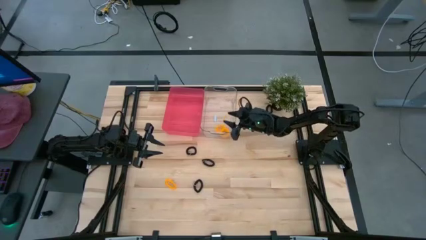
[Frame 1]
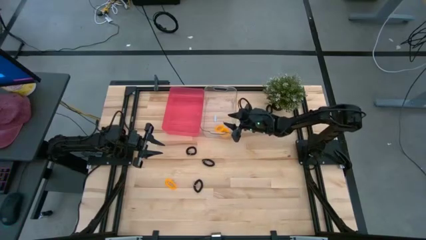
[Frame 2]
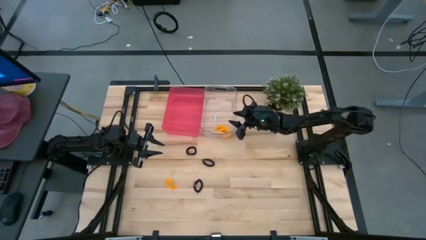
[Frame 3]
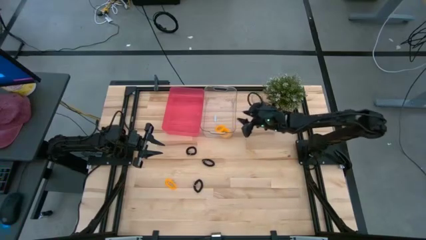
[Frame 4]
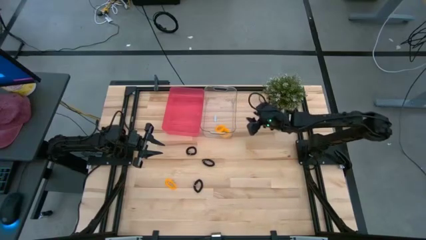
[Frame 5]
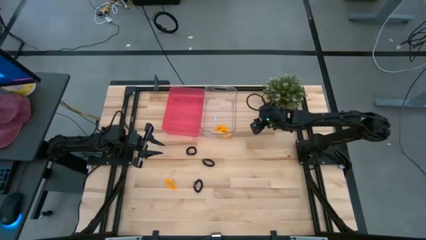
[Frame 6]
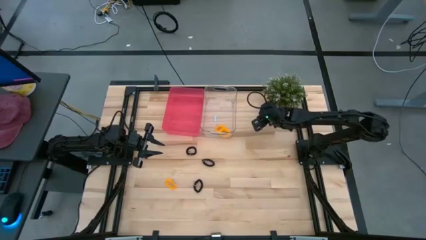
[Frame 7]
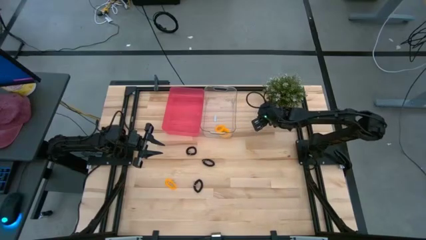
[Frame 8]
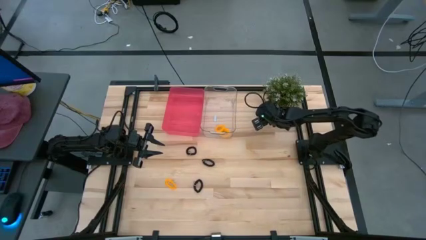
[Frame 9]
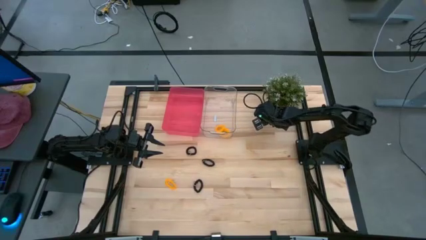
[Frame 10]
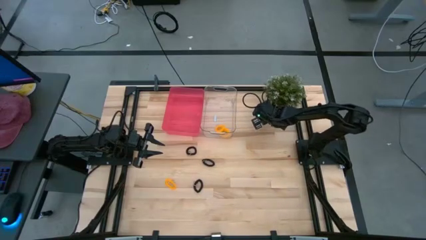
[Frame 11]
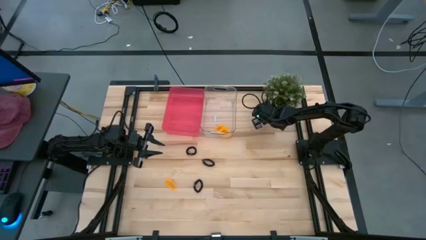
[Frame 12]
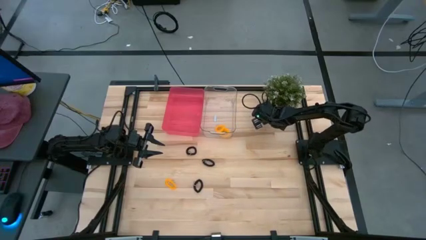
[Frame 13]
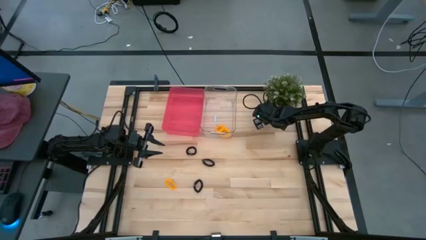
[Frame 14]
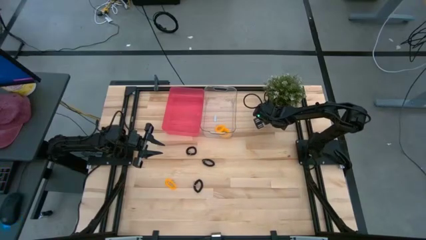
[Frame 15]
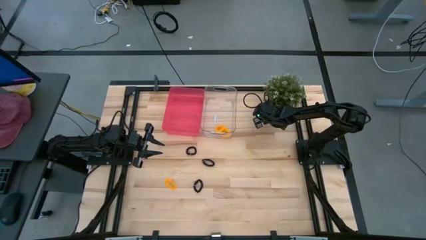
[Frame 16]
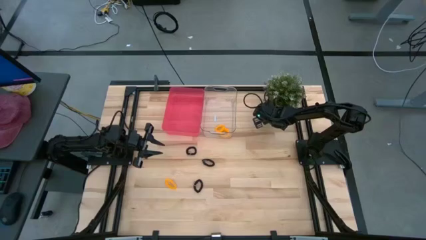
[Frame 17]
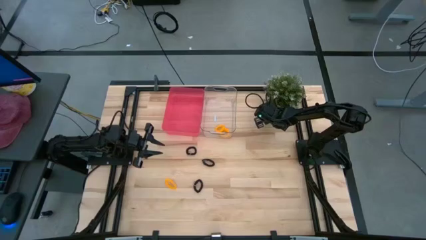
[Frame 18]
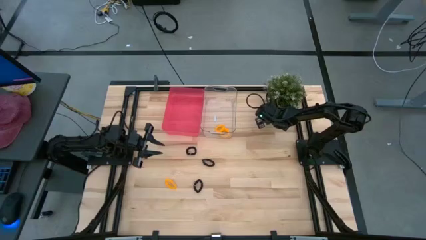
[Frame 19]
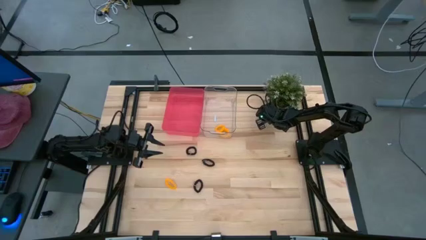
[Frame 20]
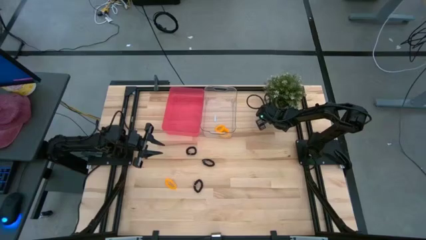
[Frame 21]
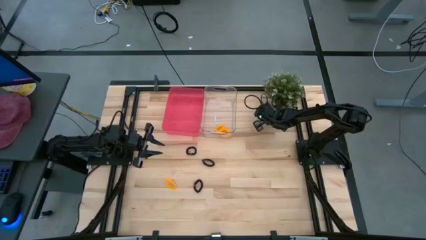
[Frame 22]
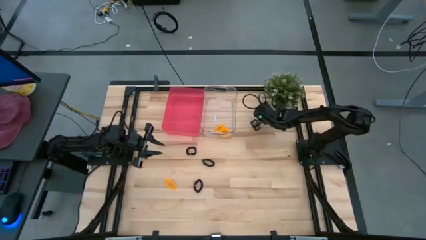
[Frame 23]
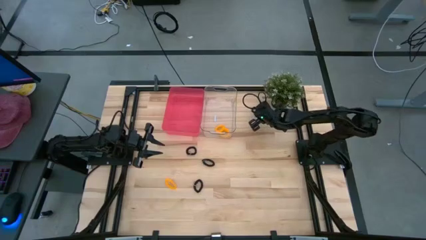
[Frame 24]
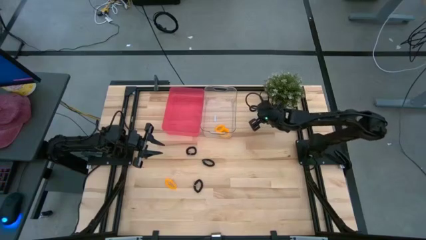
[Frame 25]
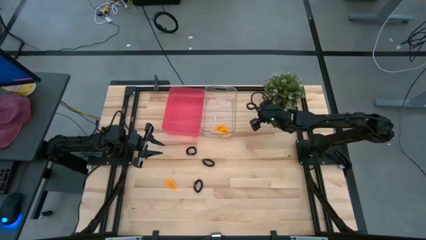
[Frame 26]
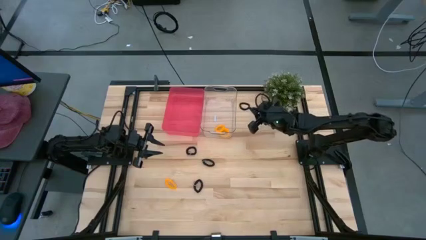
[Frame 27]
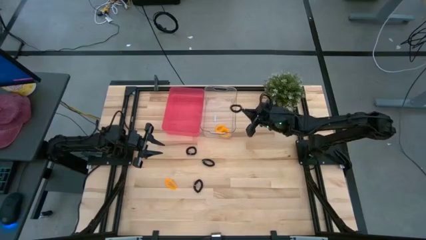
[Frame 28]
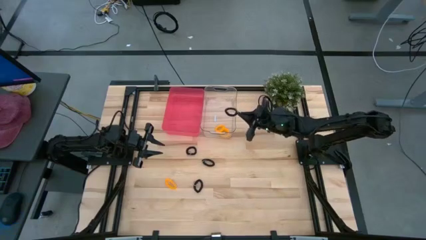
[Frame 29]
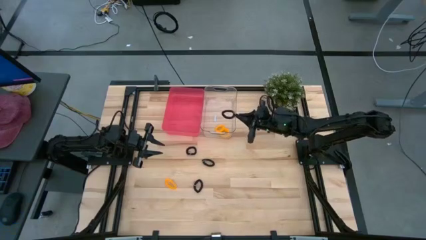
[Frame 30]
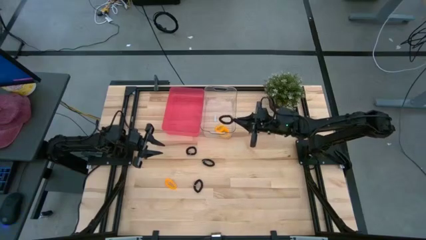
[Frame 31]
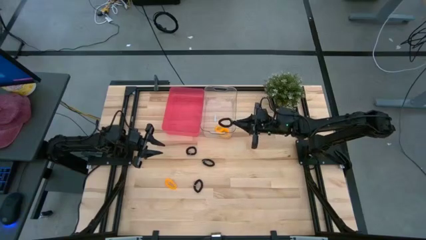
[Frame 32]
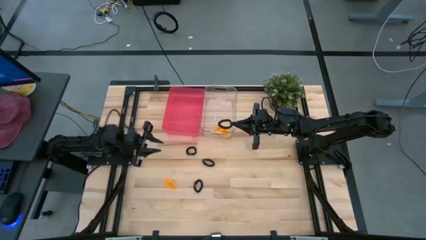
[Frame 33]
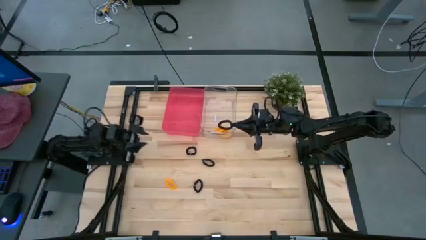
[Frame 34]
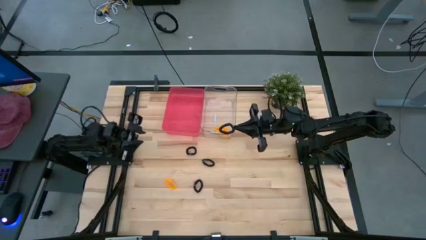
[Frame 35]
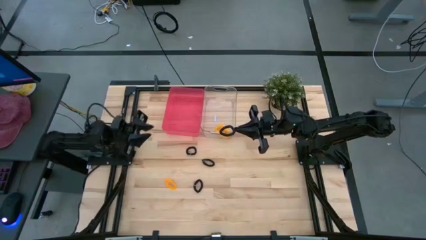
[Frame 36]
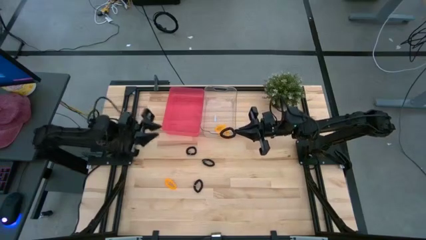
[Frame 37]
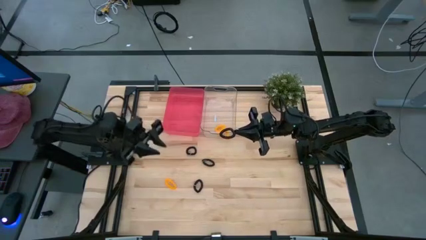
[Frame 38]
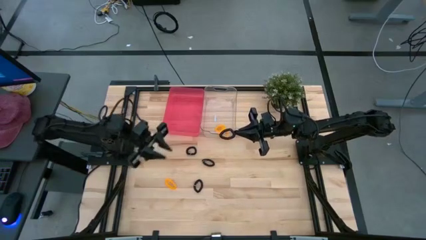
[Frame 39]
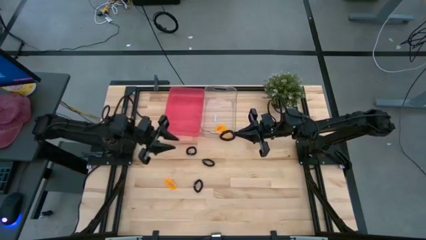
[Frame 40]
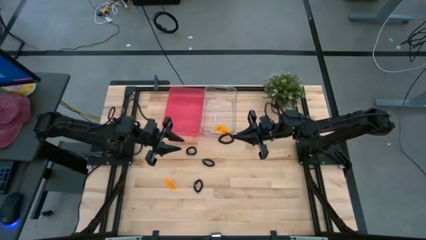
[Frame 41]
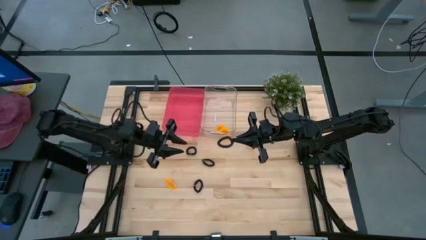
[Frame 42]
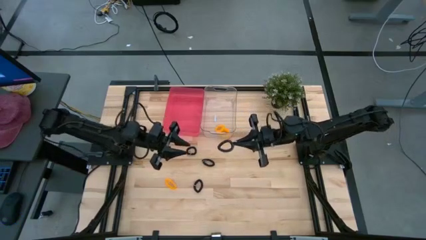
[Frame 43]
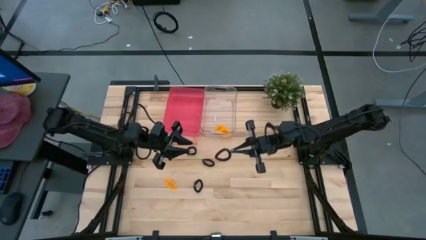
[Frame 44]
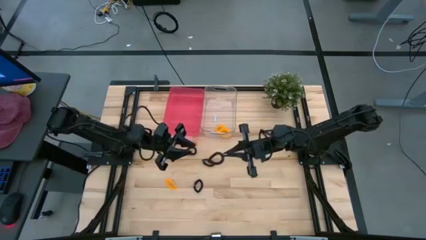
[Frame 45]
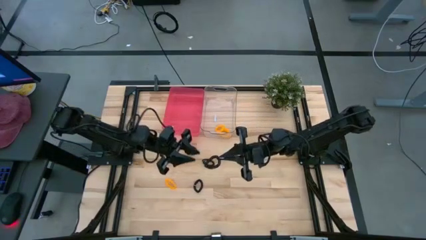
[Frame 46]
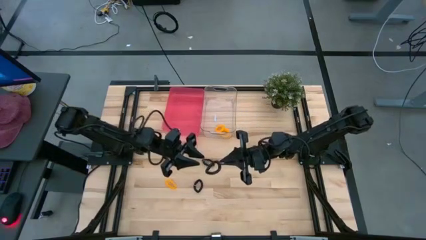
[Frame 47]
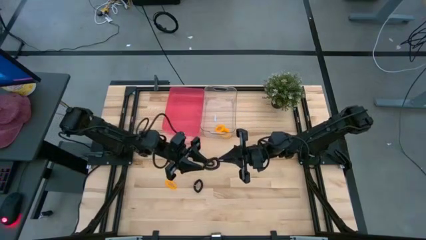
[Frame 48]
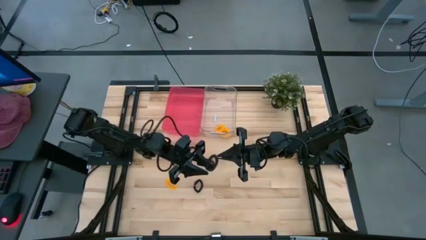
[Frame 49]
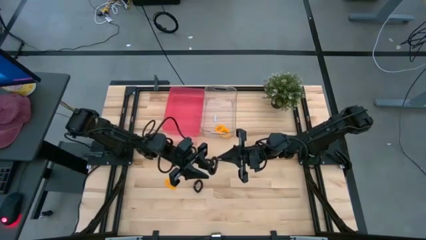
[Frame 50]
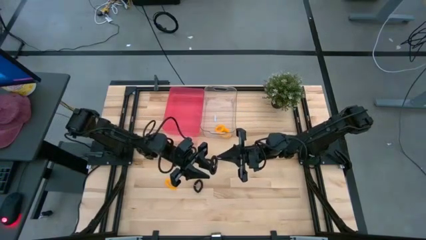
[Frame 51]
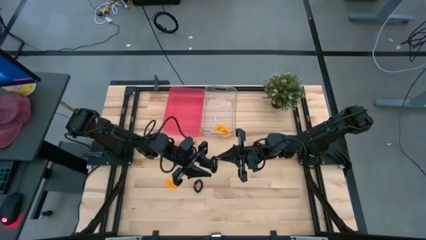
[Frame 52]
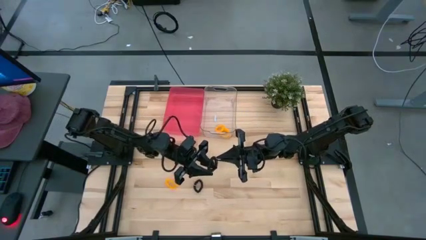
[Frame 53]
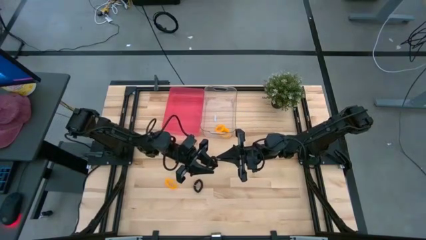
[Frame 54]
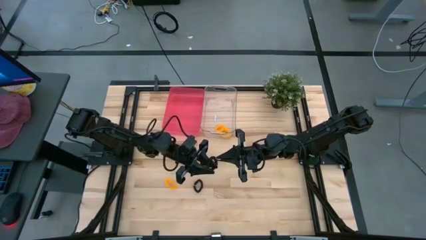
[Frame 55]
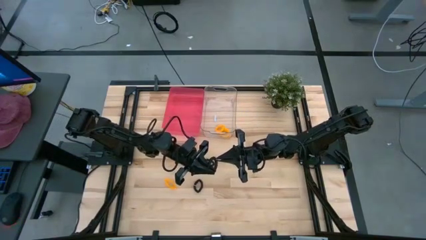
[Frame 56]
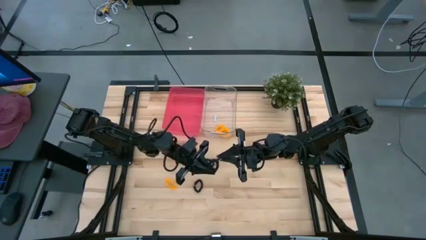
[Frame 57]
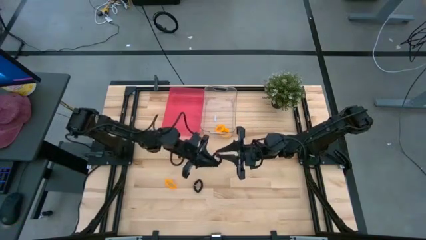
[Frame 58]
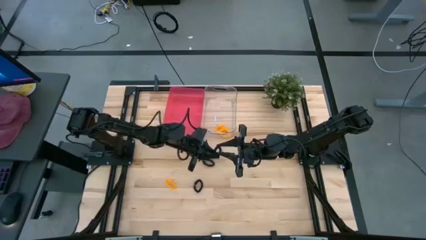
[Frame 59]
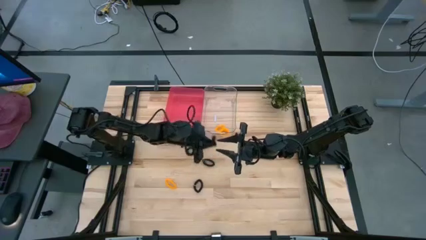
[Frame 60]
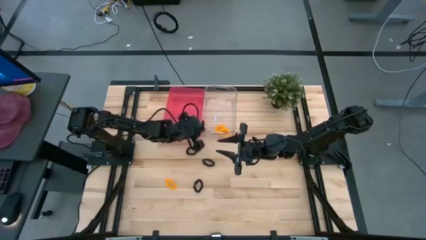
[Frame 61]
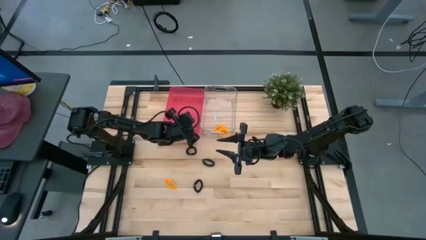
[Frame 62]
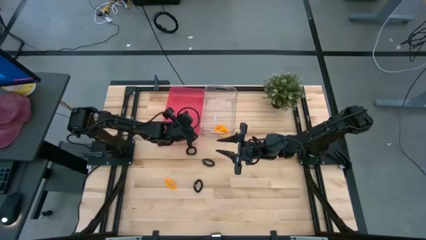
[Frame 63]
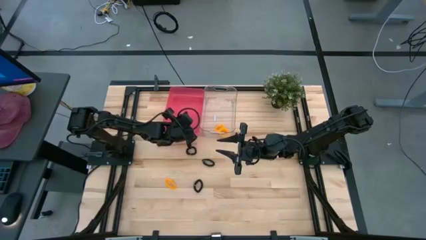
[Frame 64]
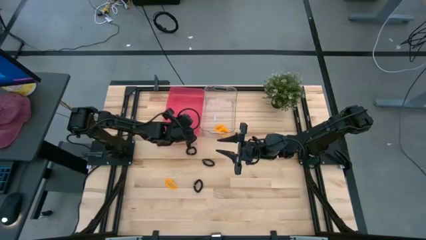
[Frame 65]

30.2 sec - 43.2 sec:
Task: Sort spring keychains
Put the black spring keychain into the red bin

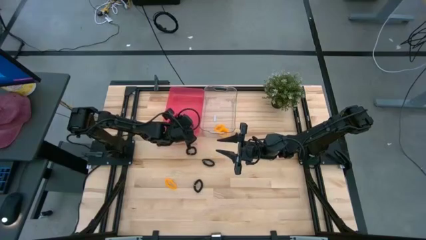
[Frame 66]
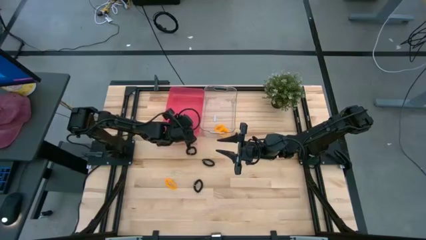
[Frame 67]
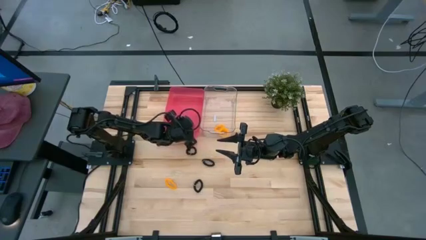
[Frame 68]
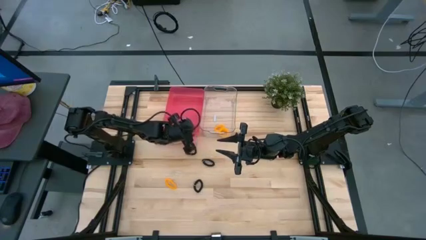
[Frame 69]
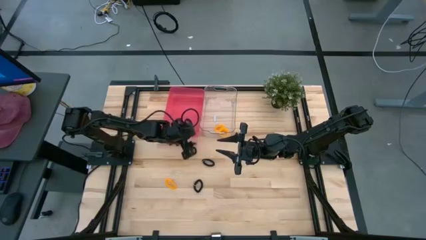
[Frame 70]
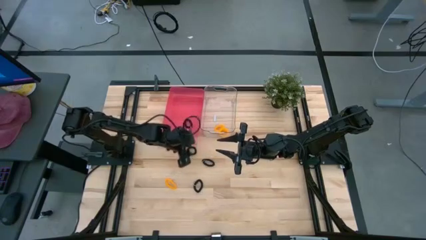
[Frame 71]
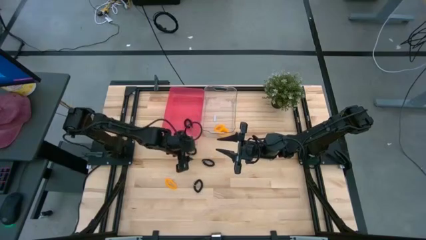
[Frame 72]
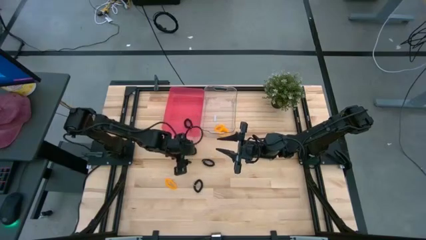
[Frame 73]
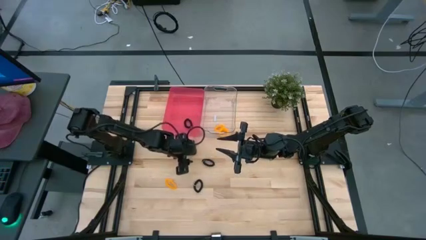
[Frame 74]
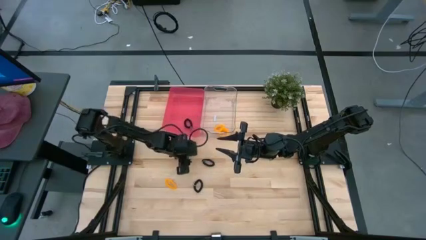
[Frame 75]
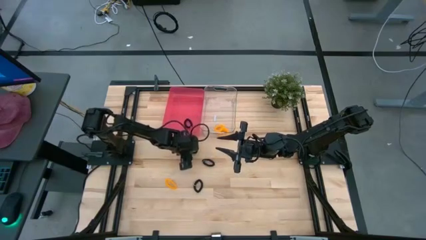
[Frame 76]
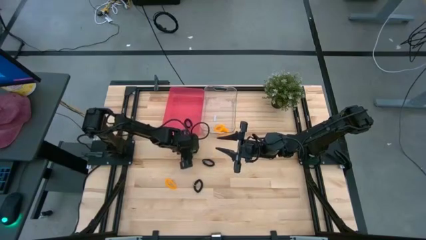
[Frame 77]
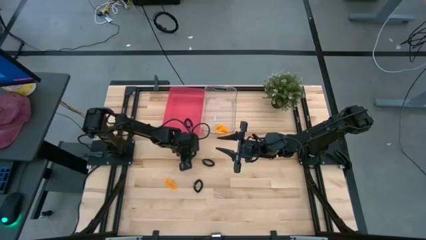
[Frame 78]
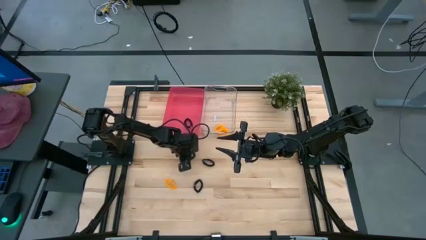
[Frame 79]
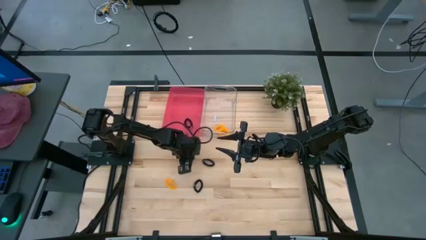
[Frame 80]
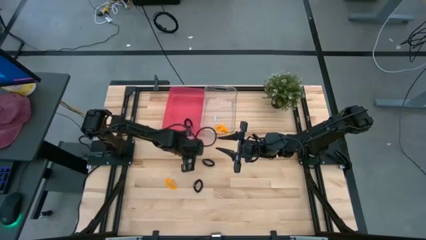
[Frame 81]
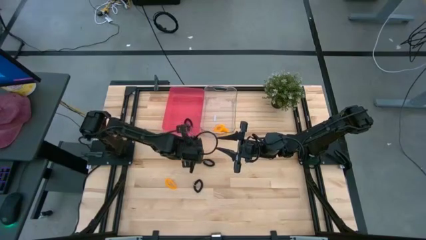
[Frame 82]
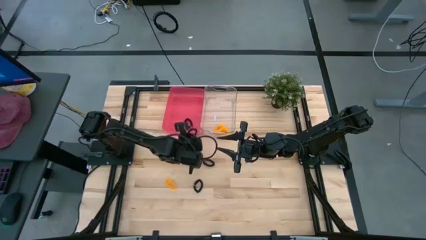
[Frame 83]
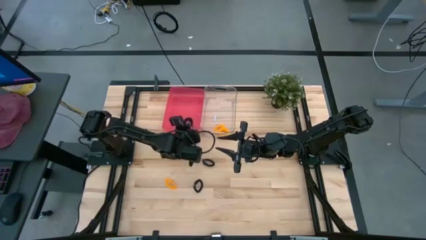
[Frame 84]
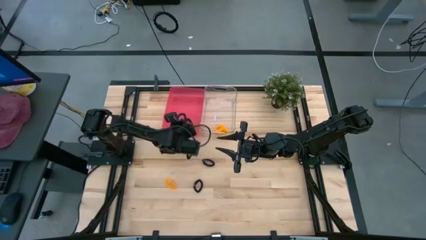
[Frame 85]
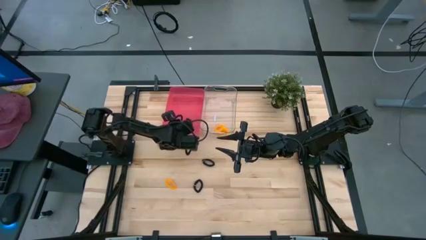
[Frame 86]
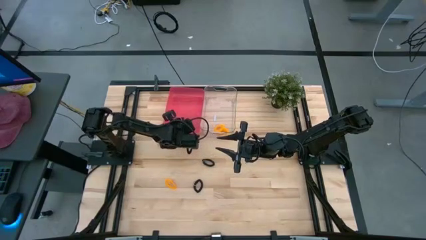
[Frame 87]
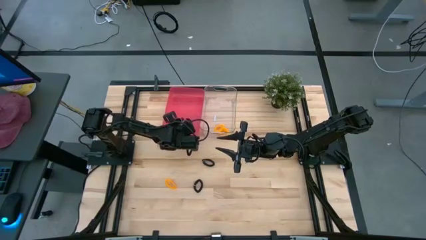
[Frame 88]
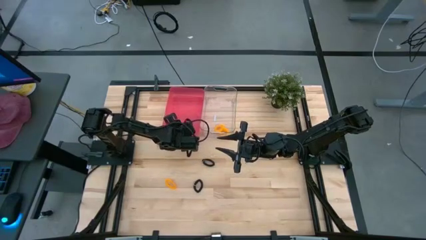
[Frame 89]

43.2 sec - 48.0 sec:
Put the black spring keychain into the red bin
